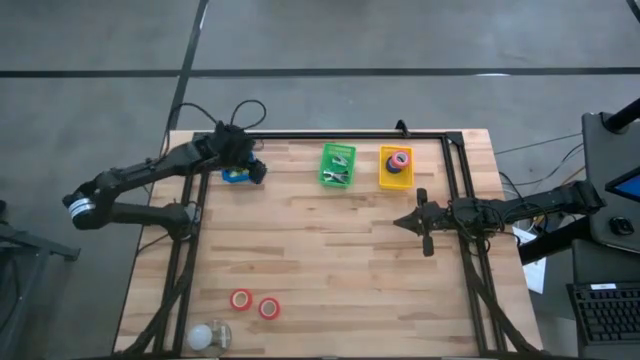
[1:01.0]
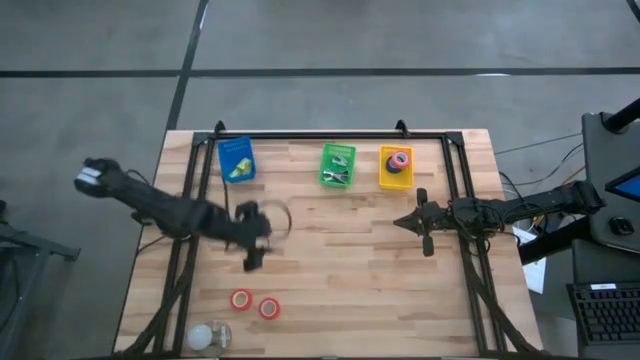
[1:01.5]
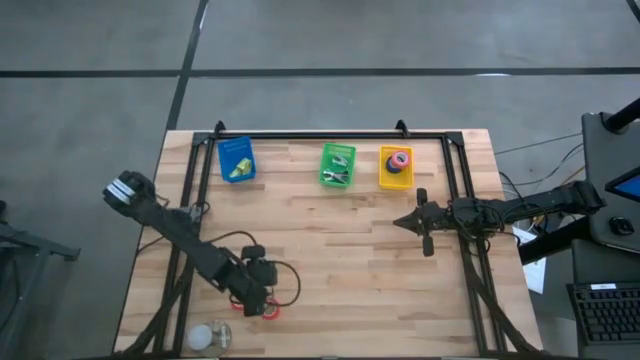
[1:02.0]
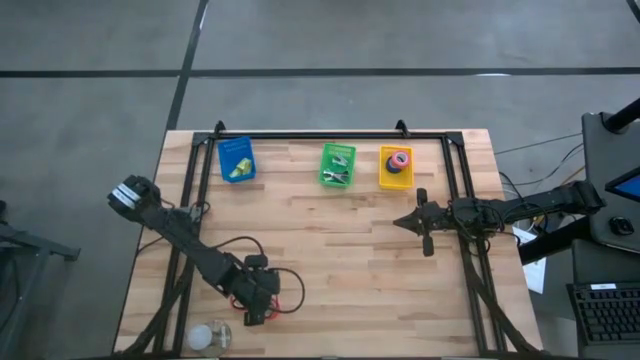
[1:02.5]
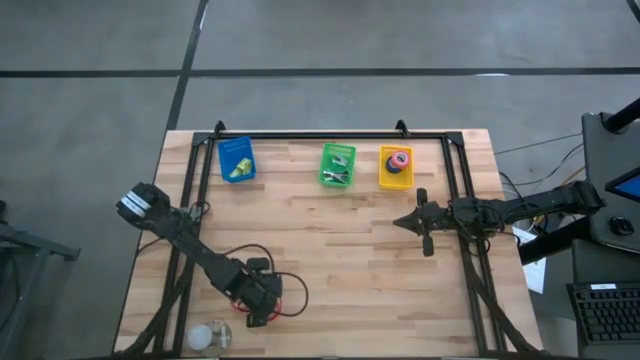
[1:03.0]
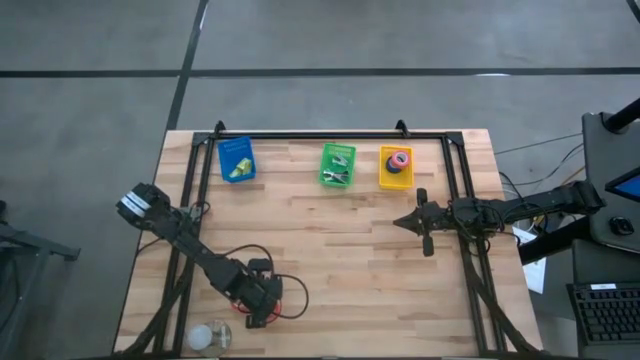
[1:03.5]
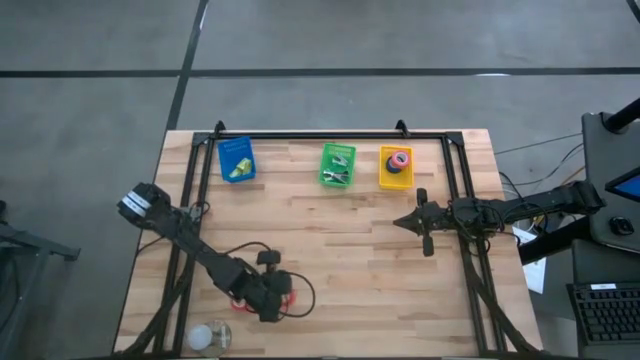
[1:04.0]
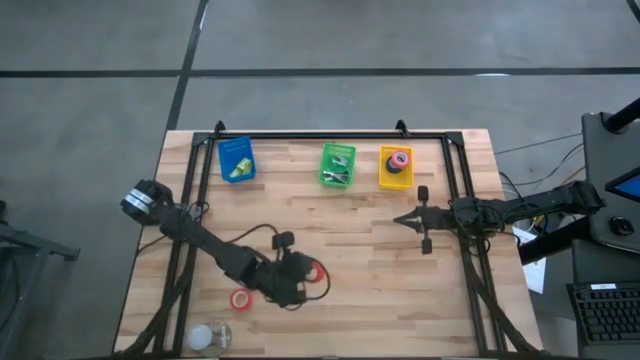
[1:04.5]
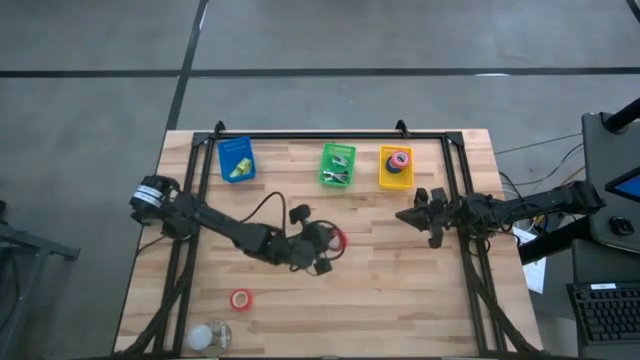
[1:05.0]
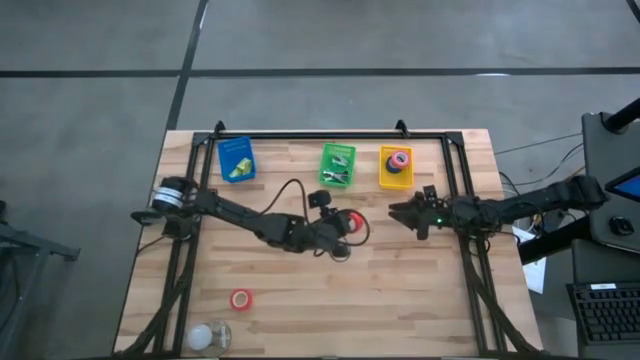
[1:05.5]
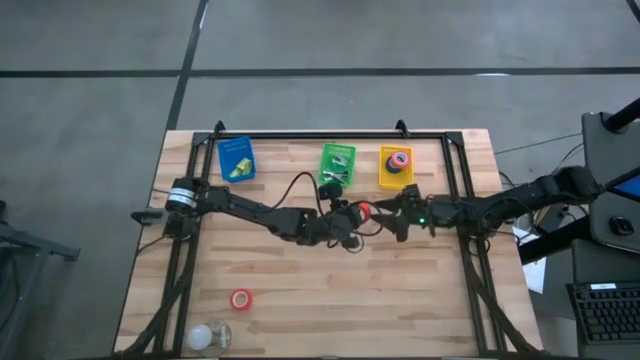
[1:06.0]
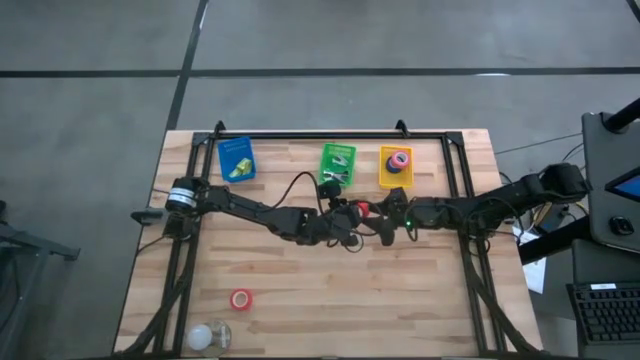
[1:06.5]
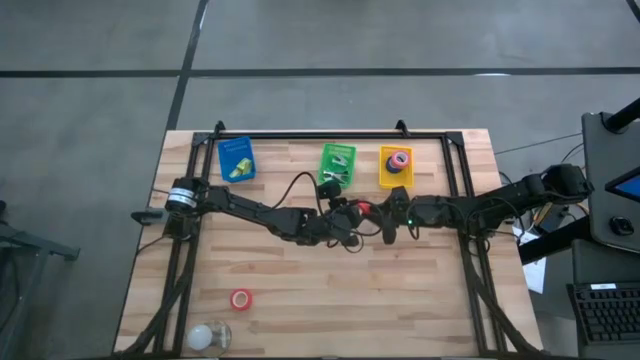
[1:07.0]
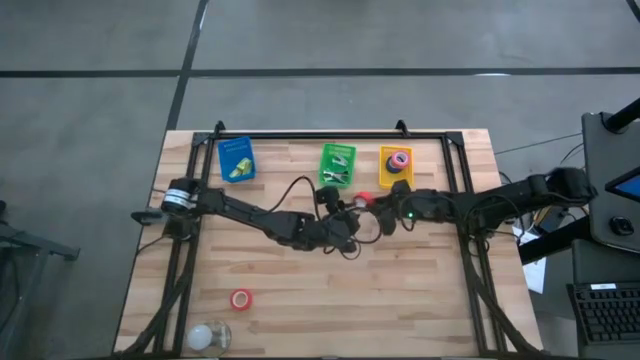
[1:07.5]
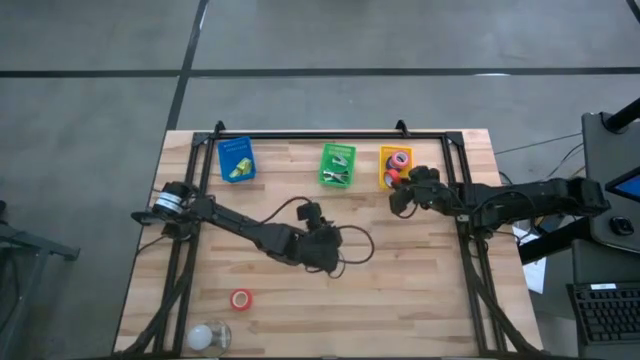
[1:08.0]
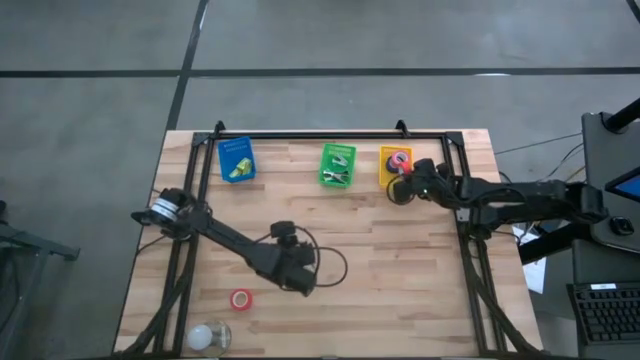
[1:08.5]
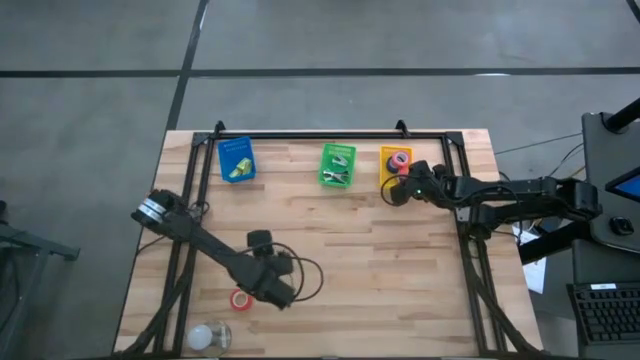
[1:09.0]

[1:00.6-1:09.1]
Task: Pick and place Stapler, Stapler remover, tape
Put the right orange tape into the yellow basket

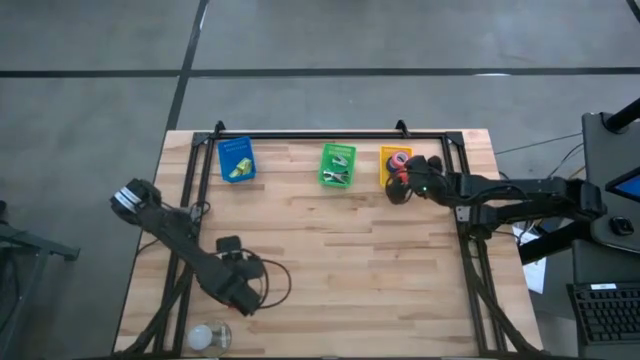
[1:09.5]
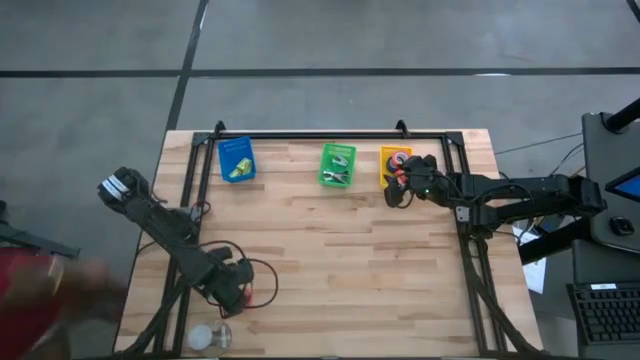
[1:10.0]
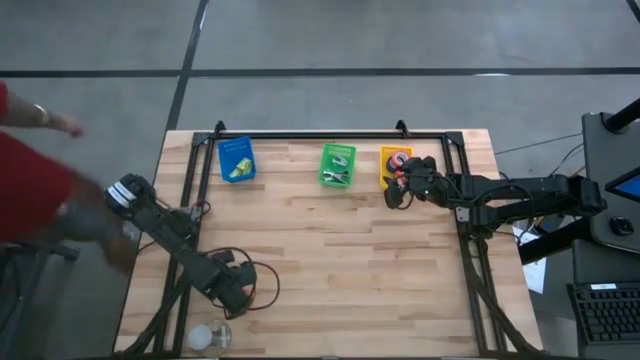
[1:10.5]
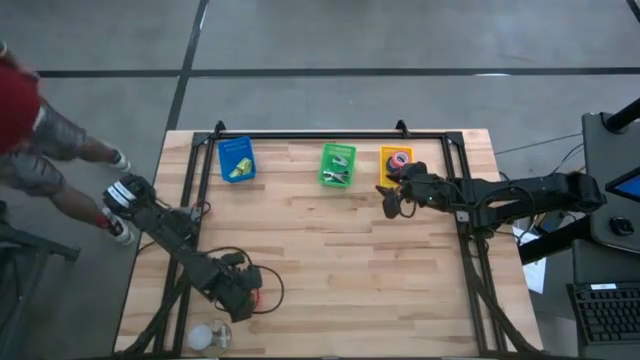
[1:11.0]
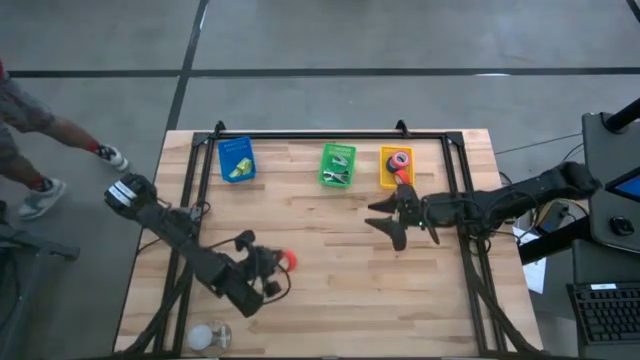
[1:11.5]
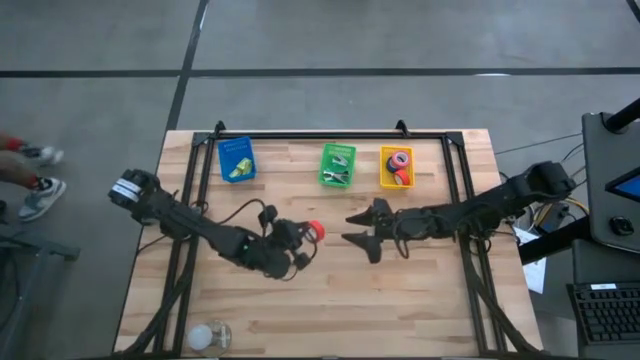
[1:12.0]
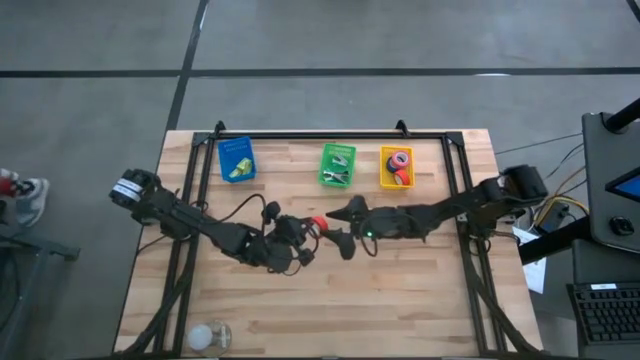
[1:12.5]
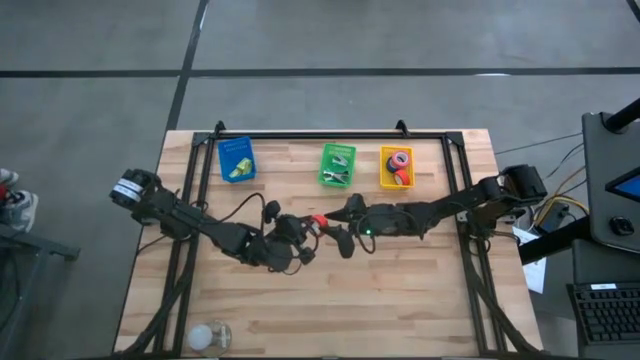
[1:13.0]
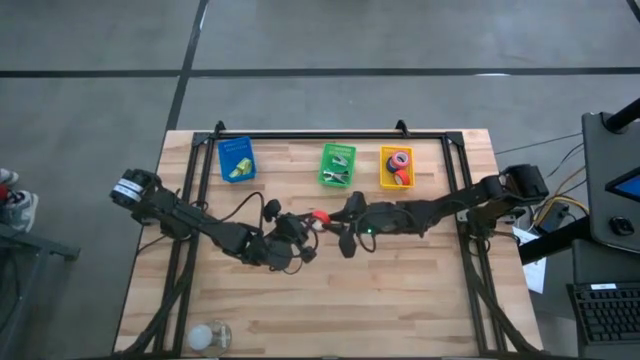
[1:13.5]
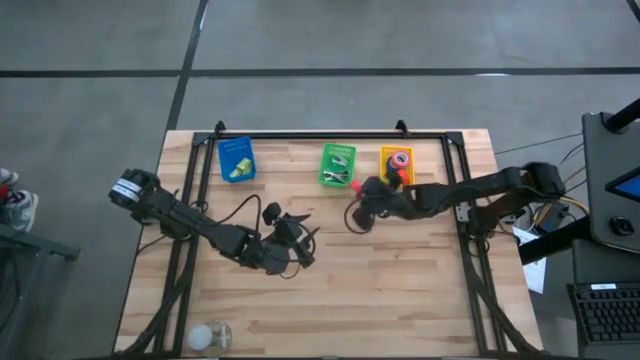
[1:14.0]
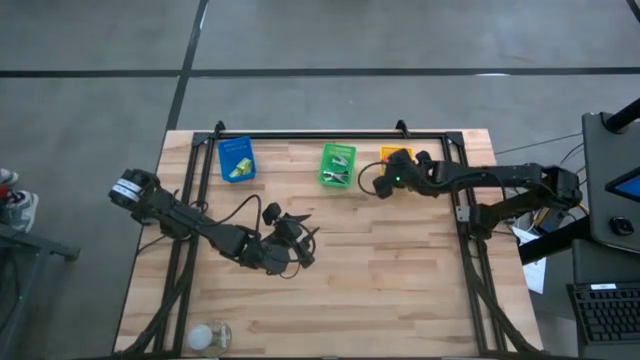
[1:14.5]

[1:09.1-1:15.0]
Put the orange tape into the yellow basket

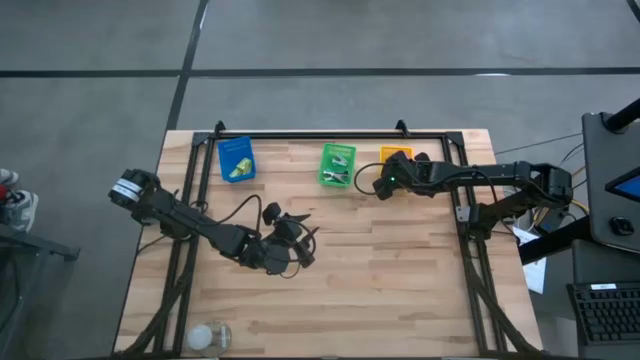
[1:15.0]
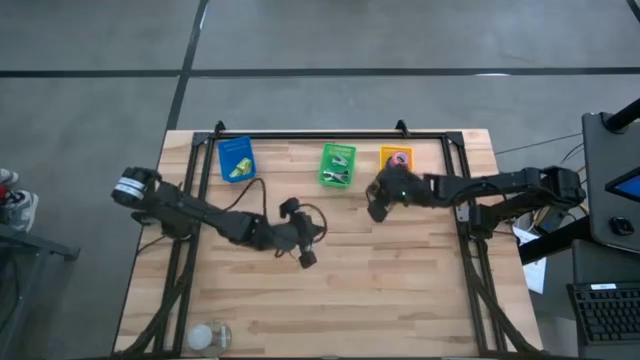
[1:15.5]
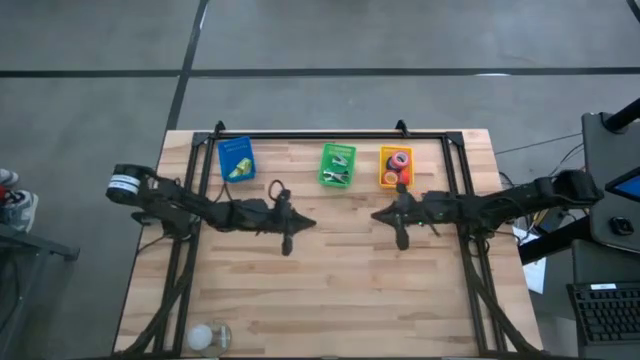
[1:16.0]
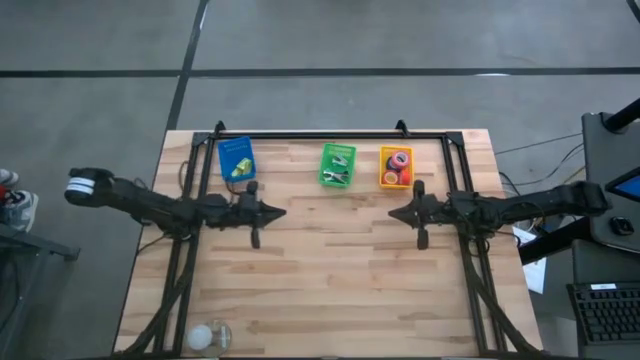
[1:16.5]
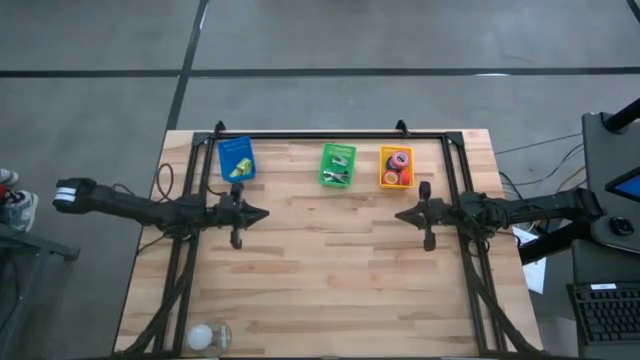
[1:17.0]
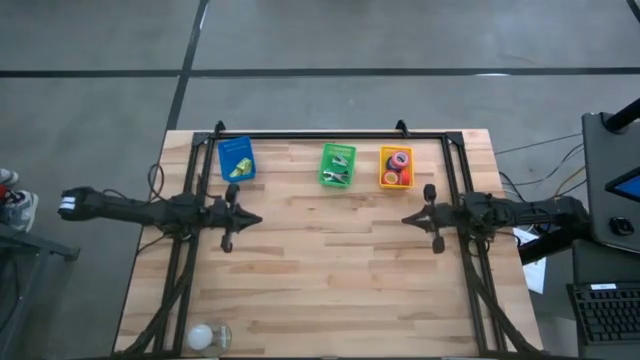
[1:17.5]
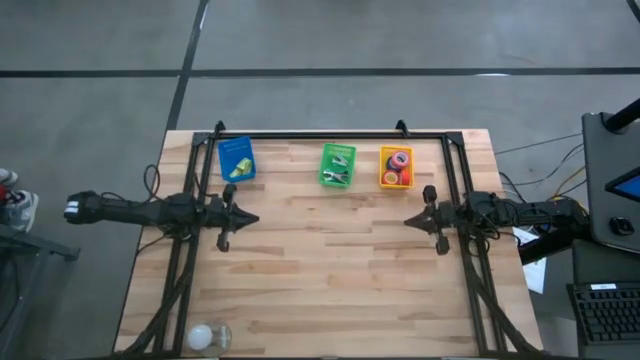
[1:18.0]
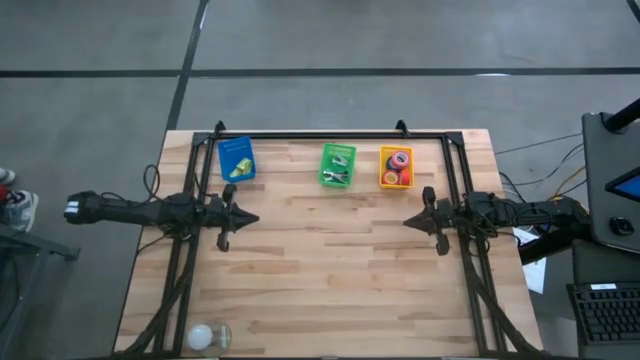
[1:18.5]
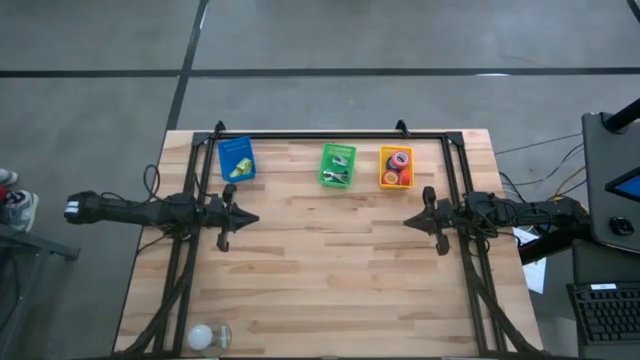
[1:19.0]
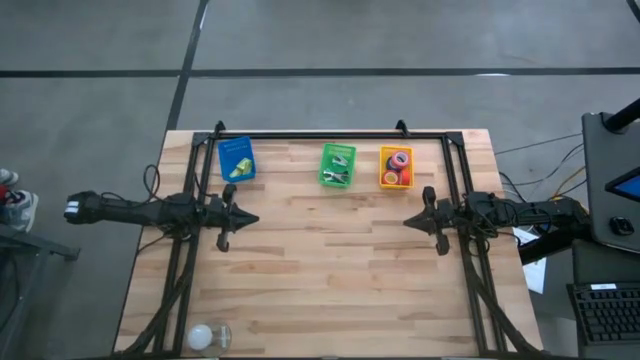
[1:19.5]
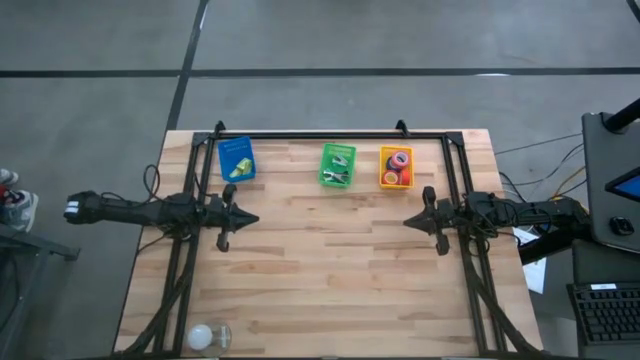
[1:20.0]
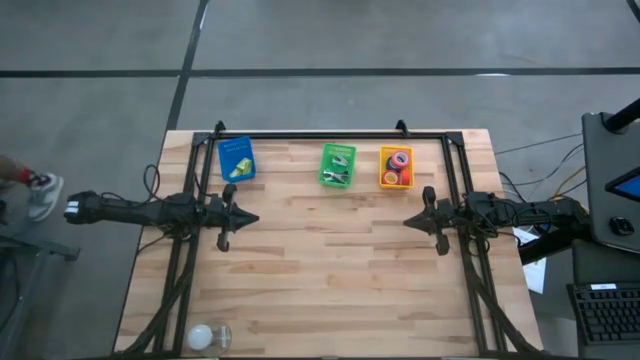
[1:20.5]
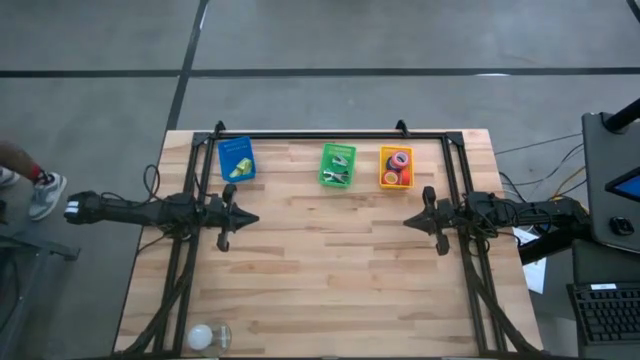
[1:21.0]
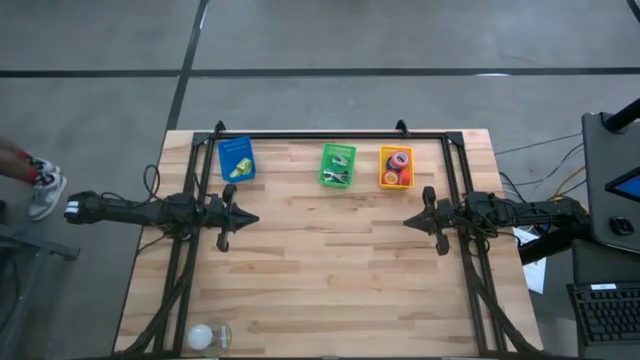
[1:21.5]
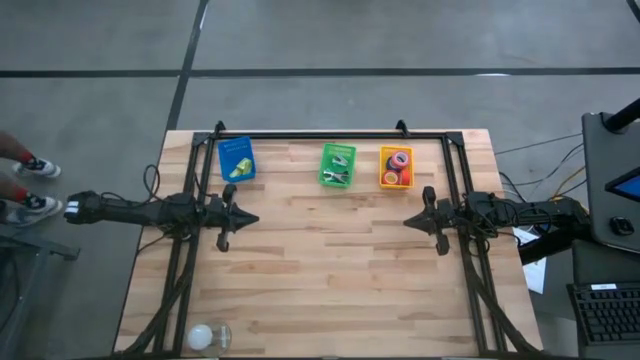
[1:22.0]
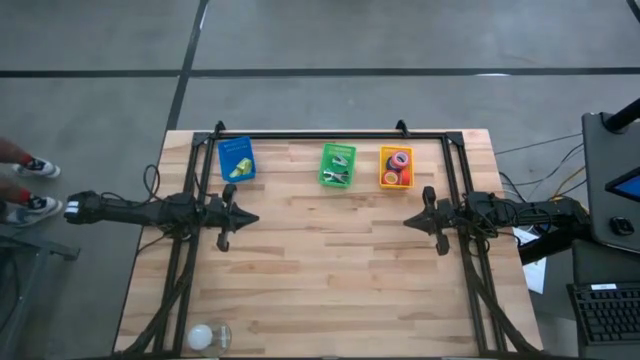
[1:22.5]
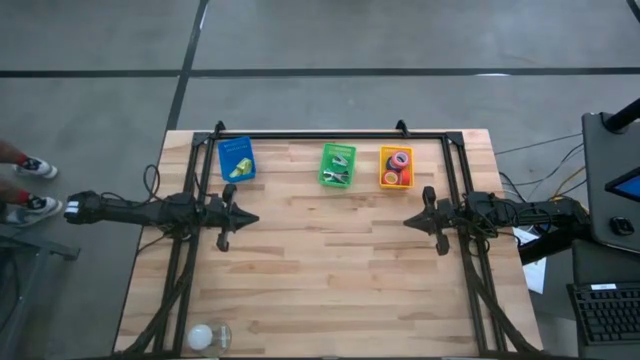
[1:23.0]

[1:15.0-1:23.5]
Return to Home Position
